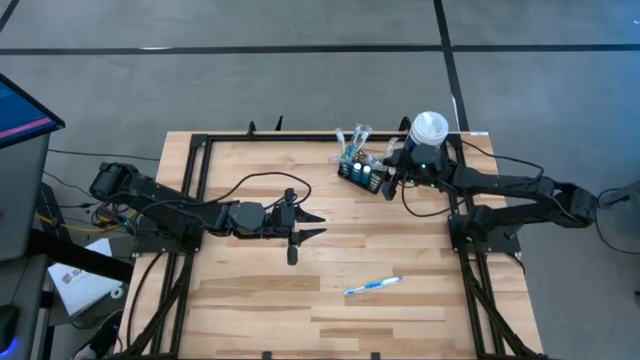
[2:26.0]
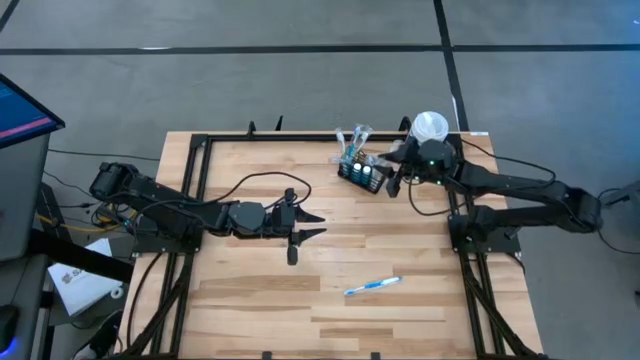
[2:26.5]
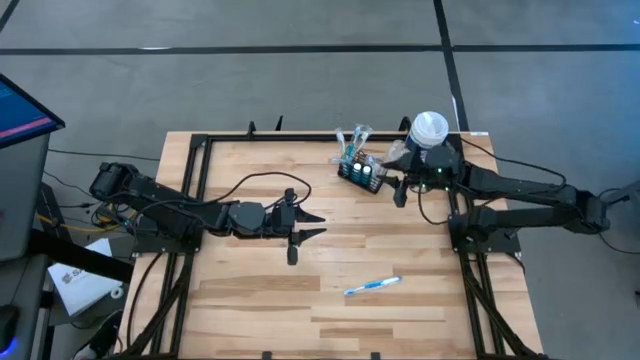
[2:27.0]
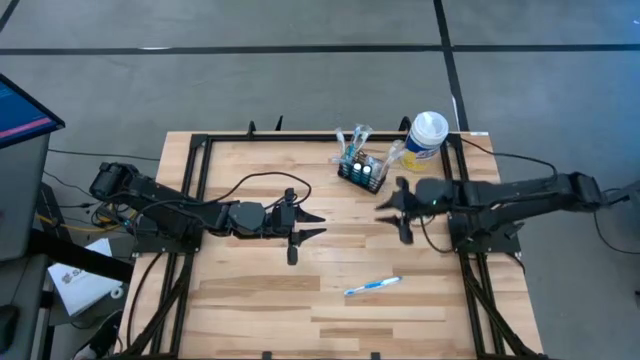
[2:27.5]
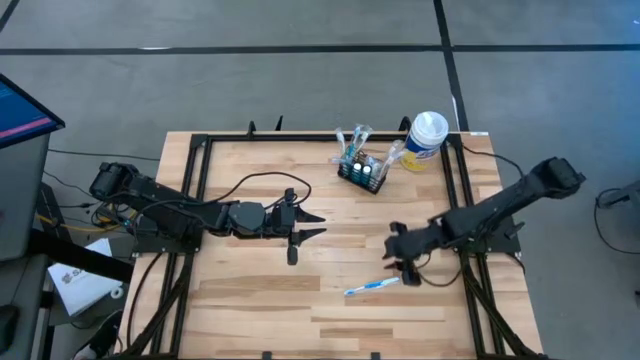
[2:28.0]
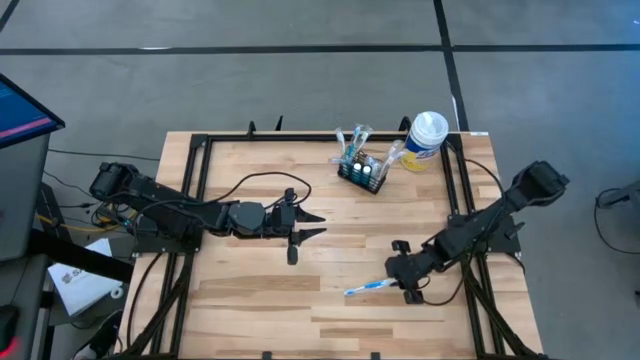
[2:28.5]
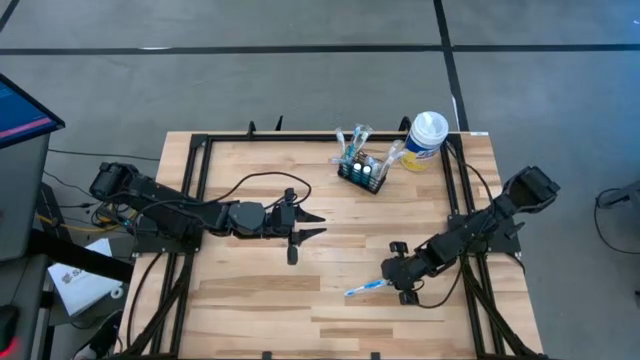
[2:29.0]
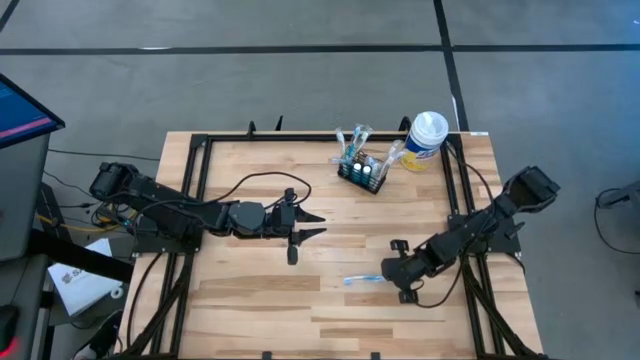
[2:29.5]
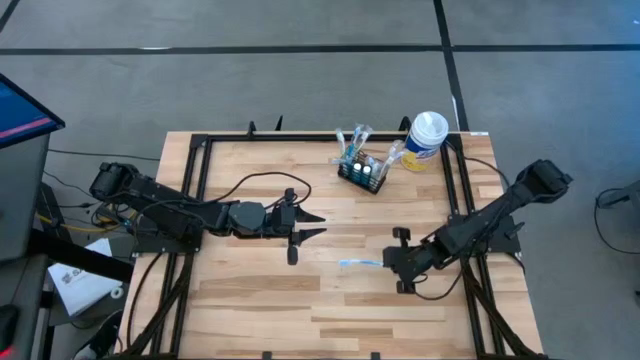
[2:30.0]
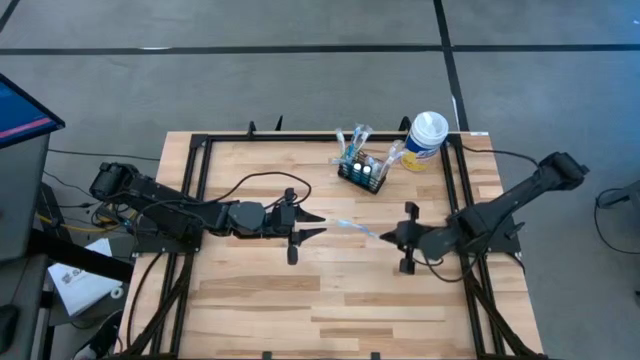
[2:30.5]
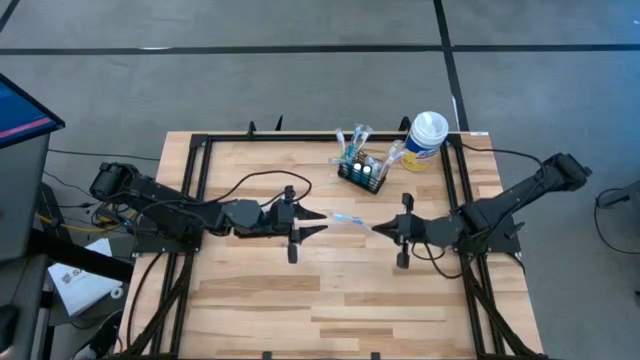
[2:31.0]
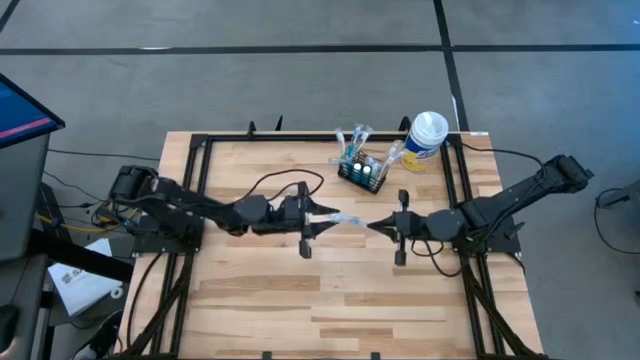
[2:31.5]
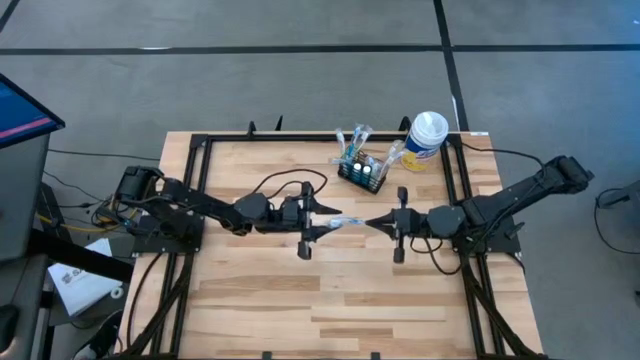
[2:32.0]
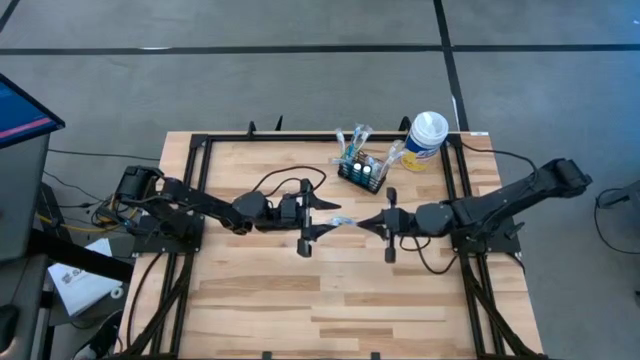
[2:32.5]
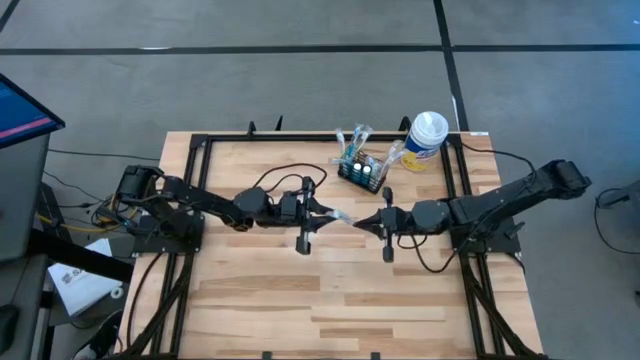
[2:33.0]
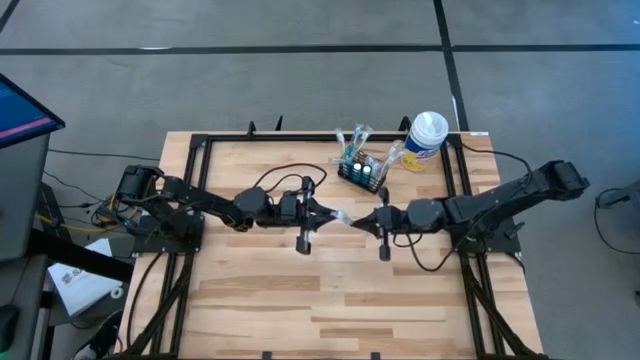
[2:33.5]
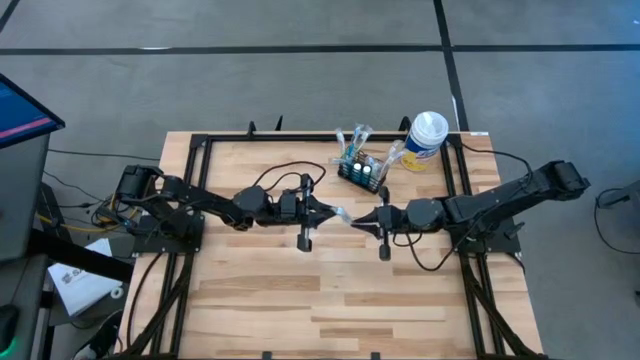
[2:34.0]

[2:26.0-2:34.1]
Task: Pick & Place toothbrushing station
Put the blue toothbrush into the mesh organizer

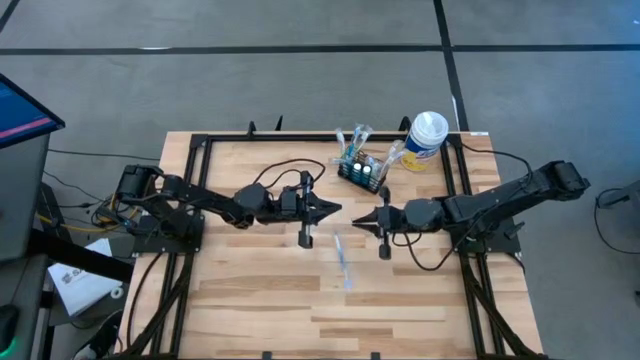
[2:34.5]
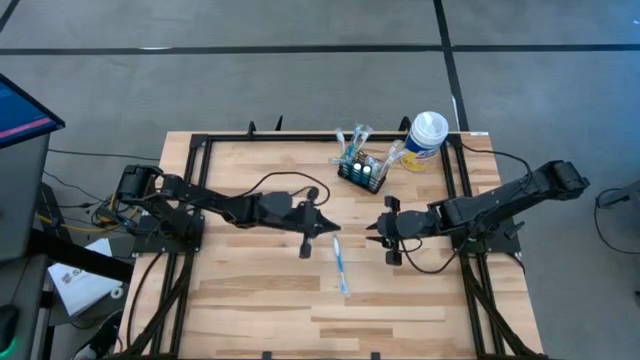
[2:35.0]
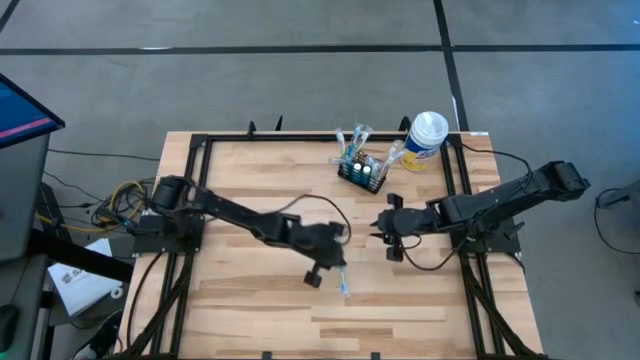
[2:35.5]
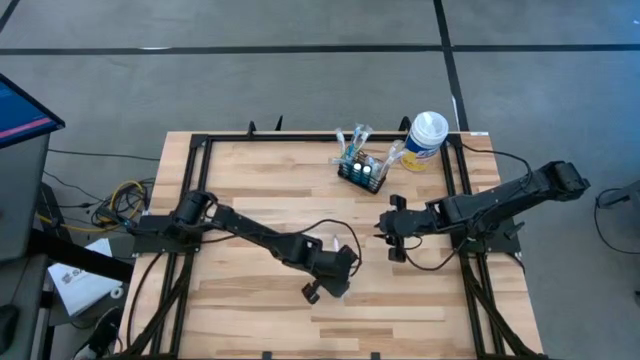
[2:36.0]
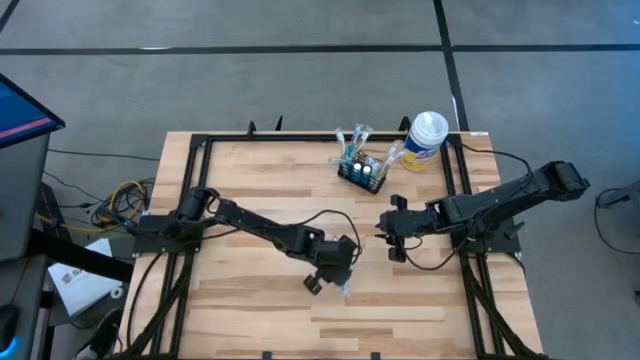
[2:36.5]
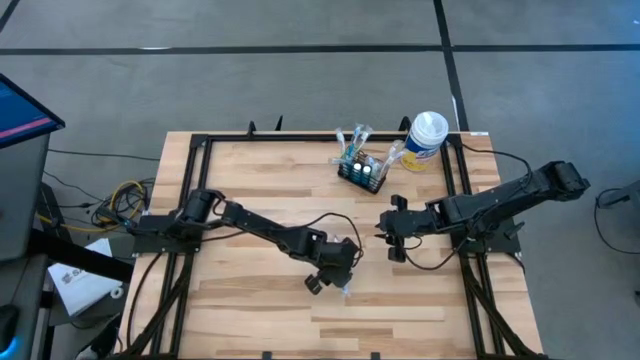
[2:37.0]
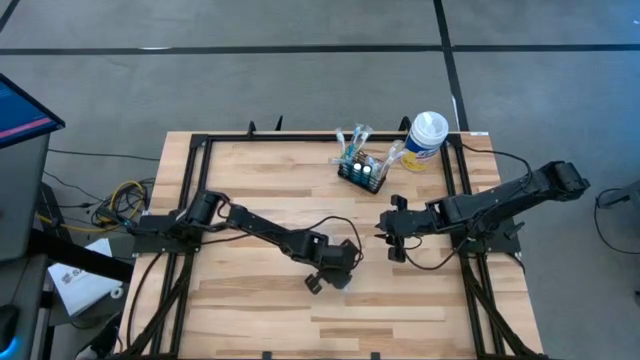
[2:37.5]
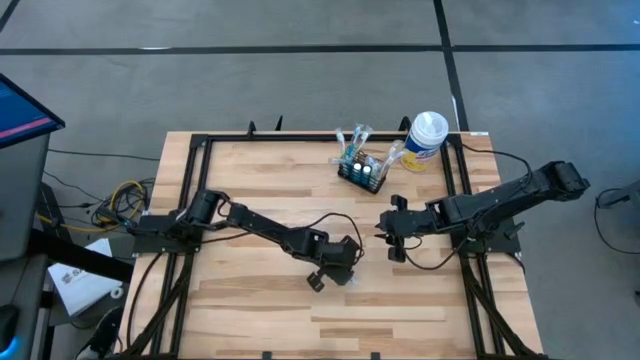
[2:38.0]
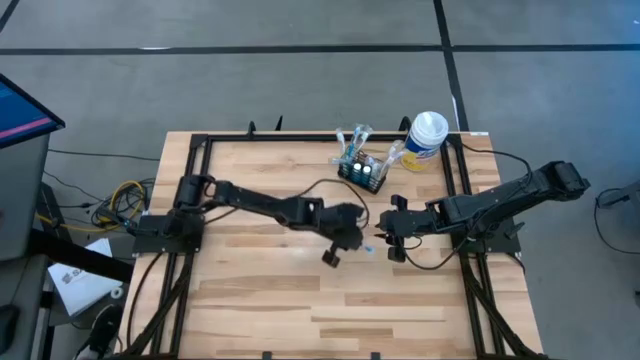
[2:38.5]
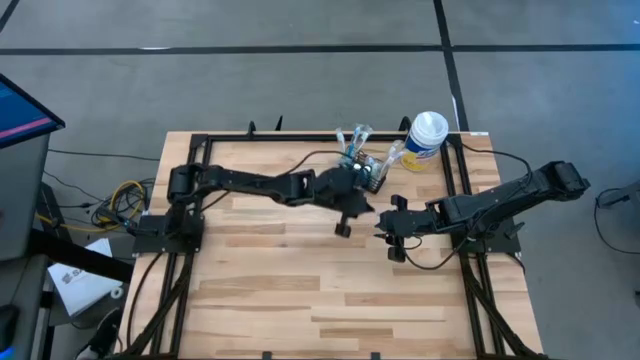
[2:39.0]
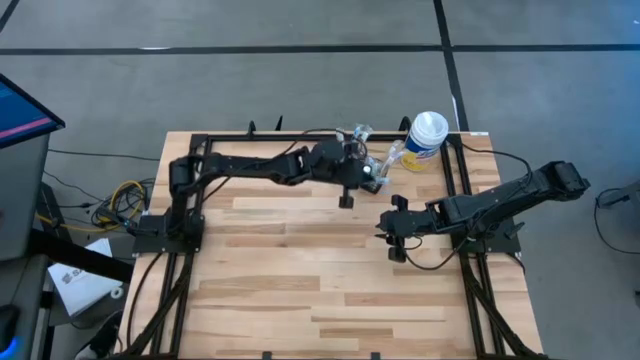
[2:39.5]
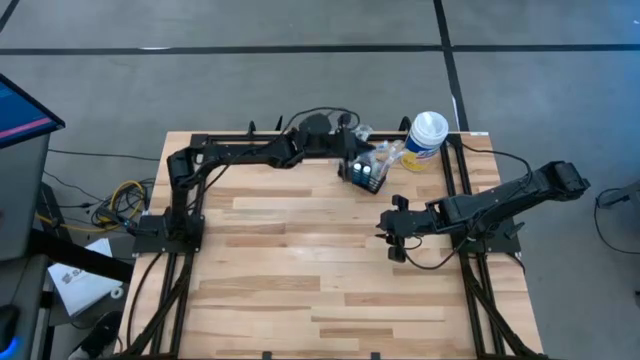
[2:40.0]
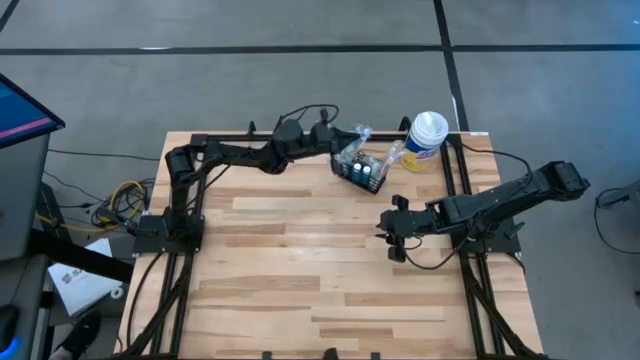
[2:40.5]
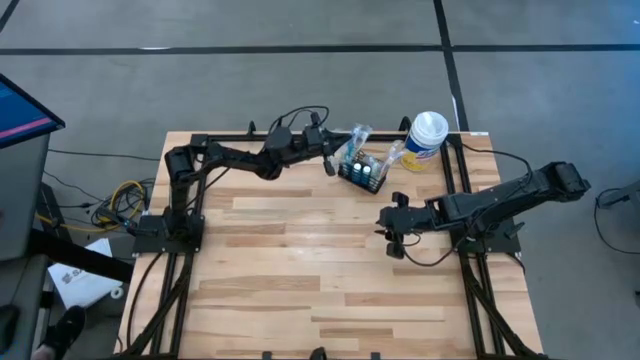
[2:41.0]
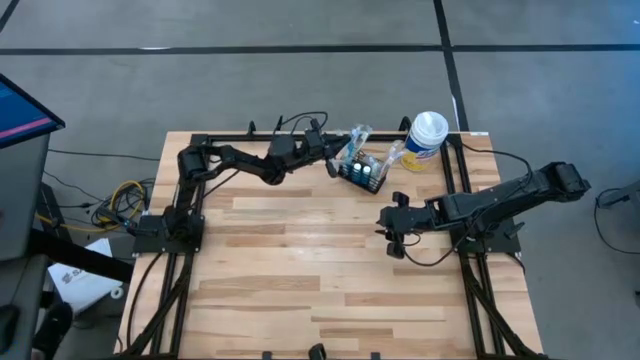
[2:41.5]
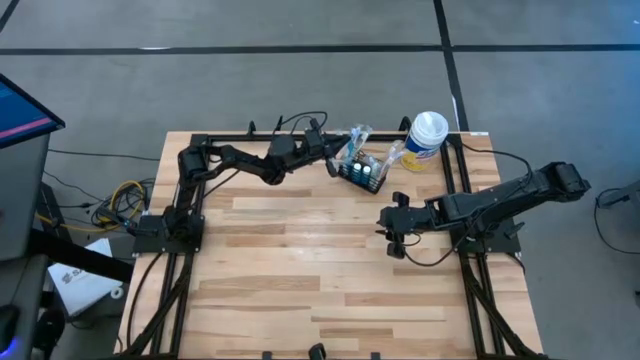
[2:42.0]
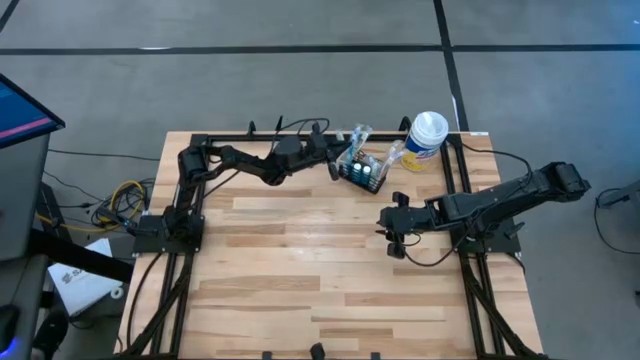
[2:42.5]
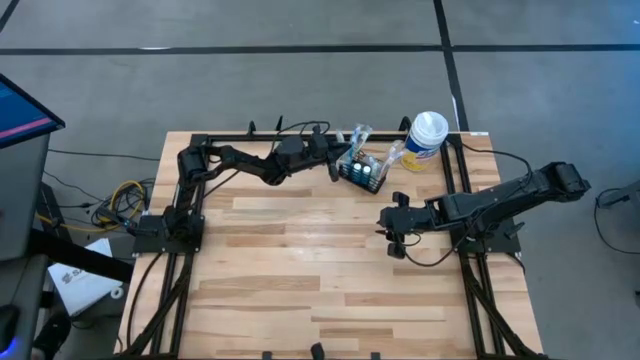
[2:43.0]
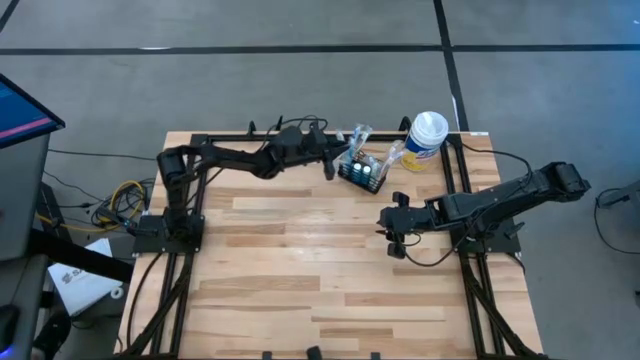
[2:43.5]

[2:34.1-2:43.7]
Put the blue toothbrush into the mesh organizer

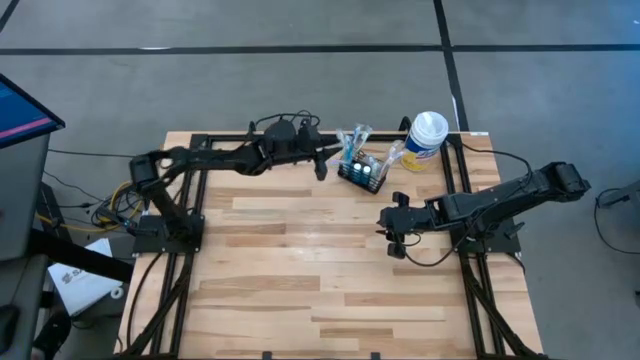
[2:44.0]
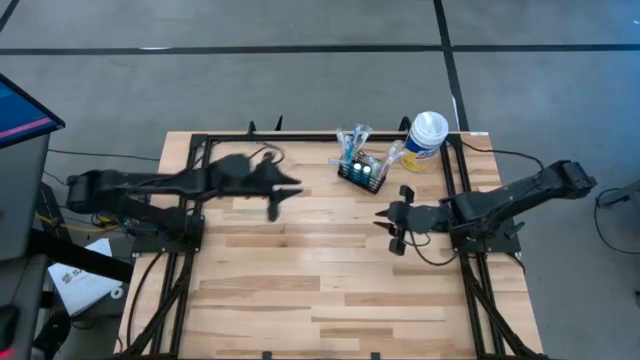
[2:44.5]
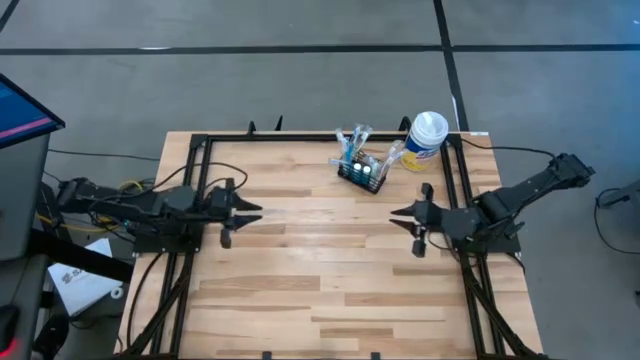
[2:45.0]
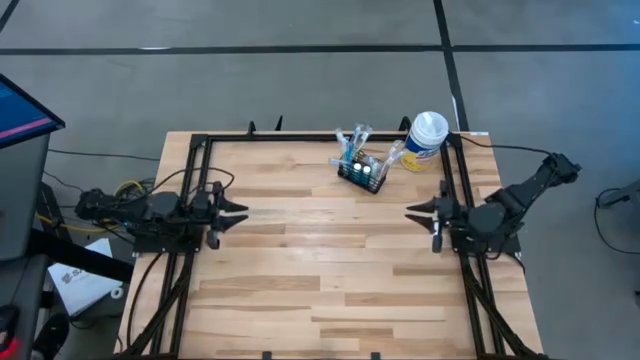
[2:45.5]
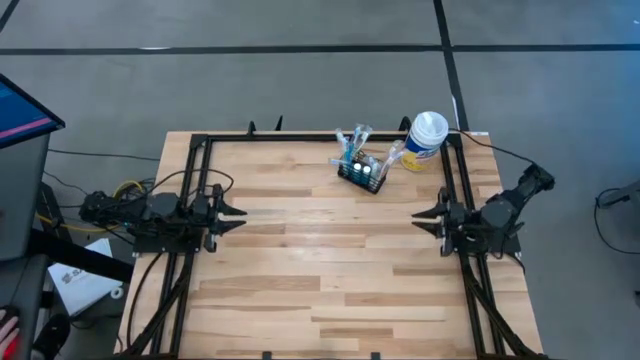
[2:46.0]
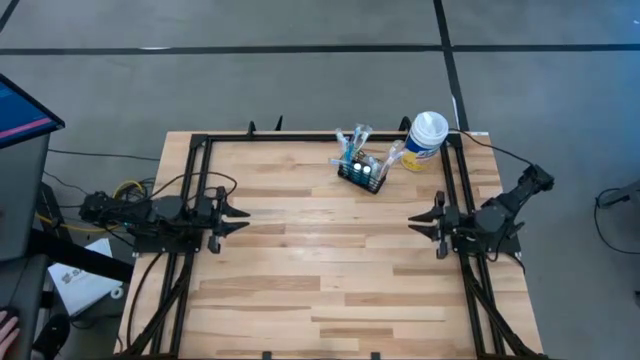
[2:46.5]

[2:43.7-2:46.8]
Return to Home Position
